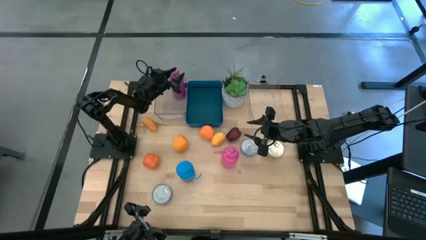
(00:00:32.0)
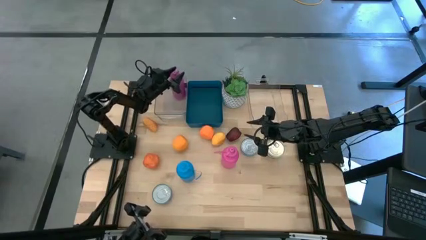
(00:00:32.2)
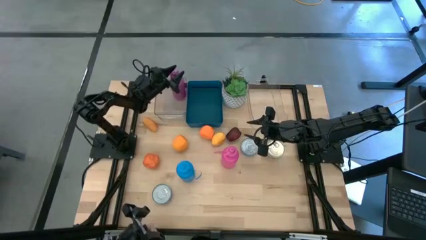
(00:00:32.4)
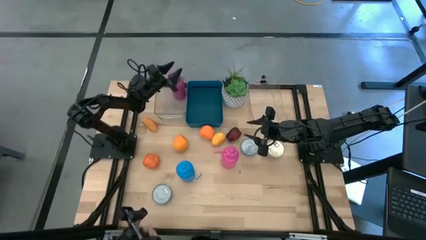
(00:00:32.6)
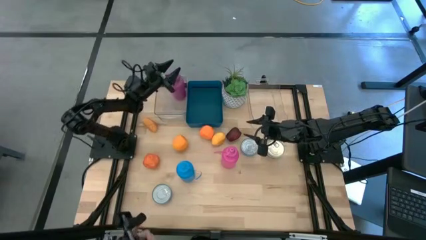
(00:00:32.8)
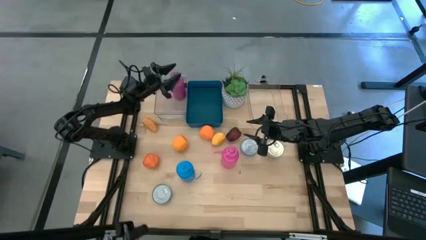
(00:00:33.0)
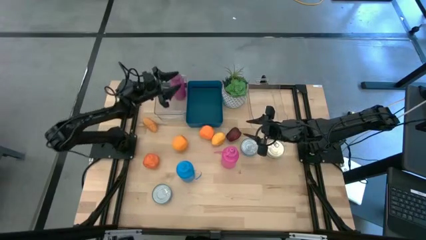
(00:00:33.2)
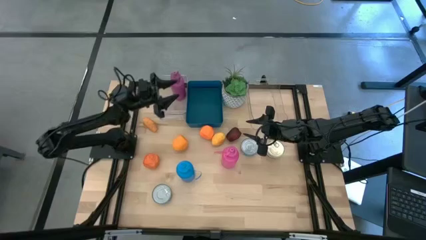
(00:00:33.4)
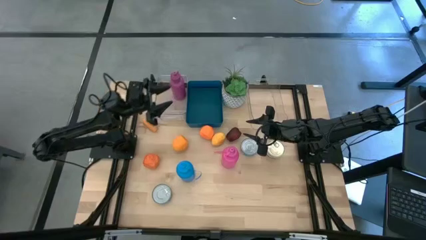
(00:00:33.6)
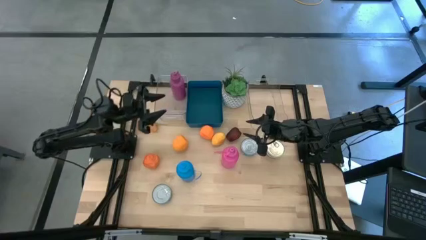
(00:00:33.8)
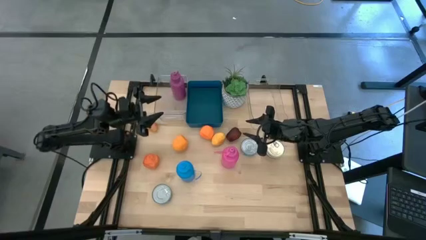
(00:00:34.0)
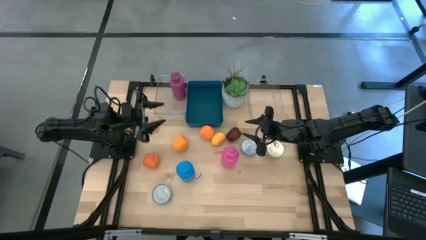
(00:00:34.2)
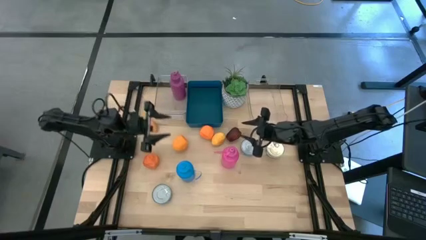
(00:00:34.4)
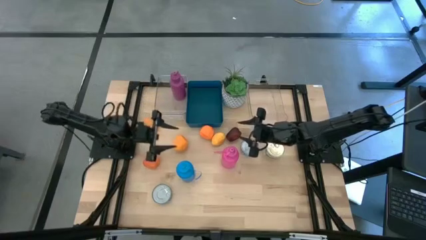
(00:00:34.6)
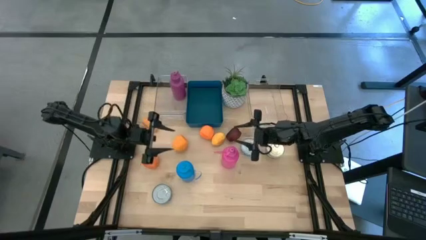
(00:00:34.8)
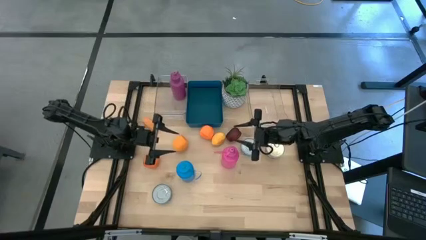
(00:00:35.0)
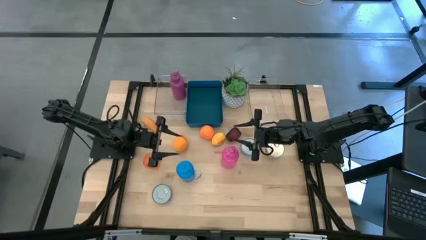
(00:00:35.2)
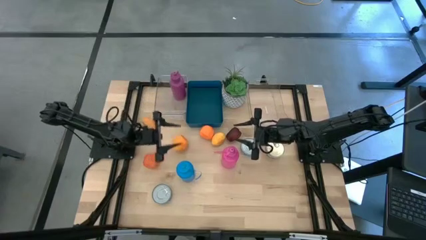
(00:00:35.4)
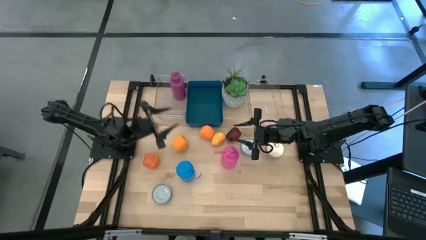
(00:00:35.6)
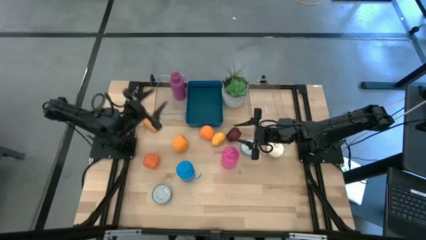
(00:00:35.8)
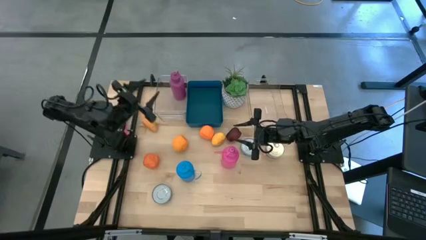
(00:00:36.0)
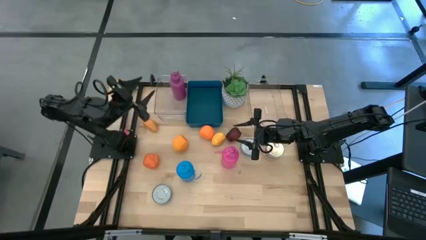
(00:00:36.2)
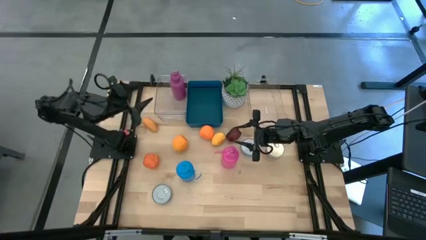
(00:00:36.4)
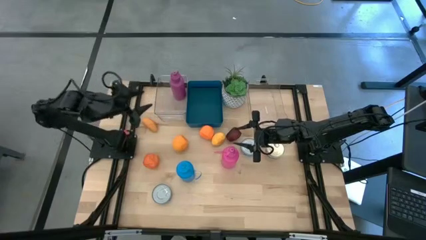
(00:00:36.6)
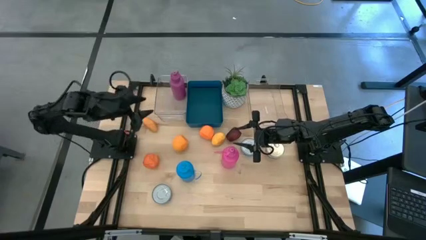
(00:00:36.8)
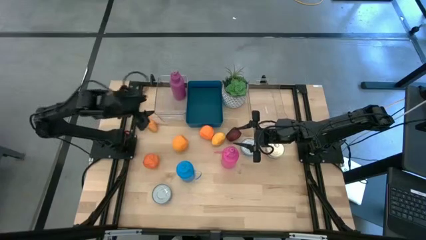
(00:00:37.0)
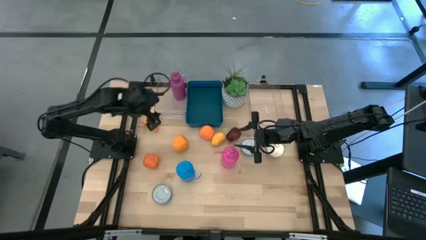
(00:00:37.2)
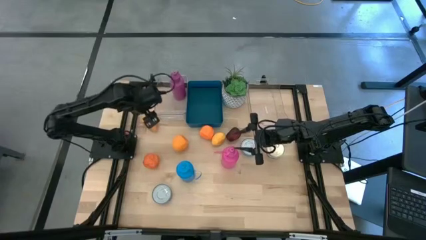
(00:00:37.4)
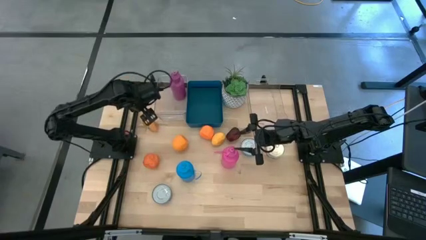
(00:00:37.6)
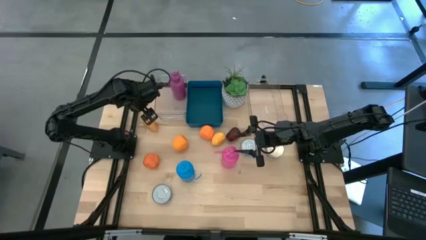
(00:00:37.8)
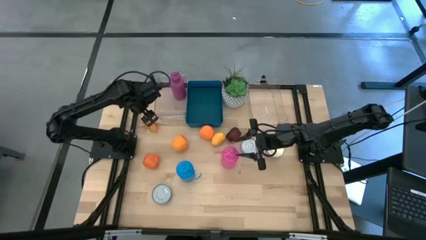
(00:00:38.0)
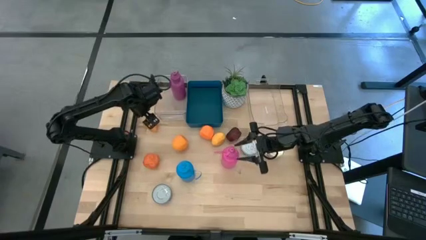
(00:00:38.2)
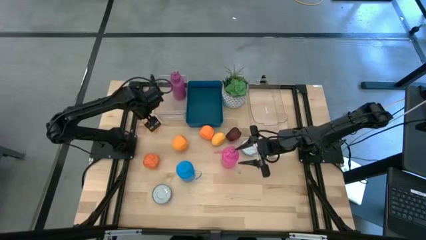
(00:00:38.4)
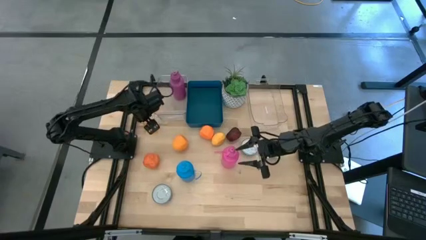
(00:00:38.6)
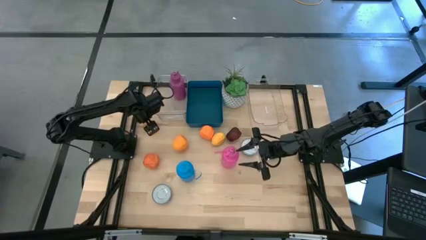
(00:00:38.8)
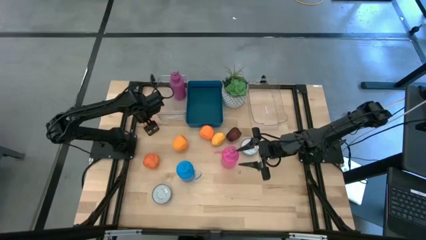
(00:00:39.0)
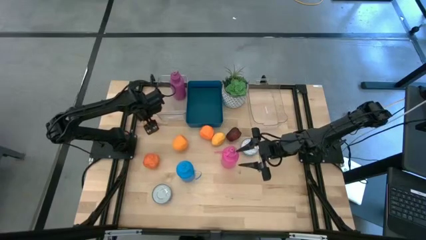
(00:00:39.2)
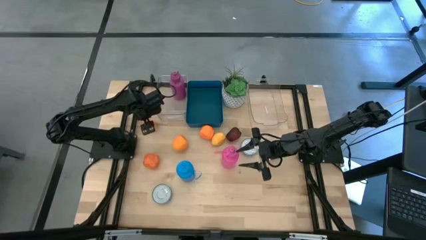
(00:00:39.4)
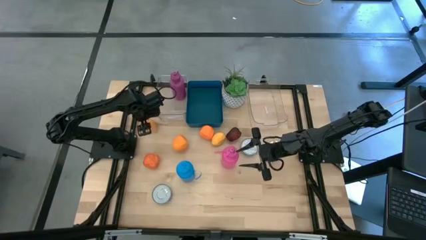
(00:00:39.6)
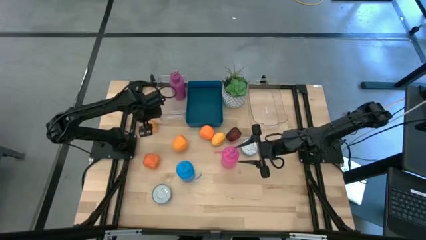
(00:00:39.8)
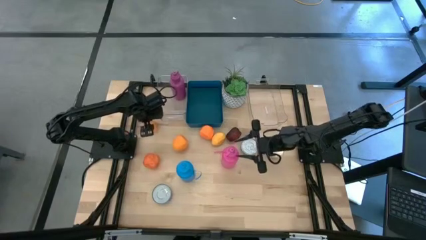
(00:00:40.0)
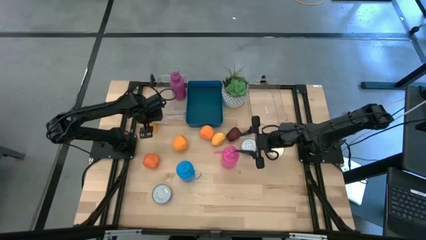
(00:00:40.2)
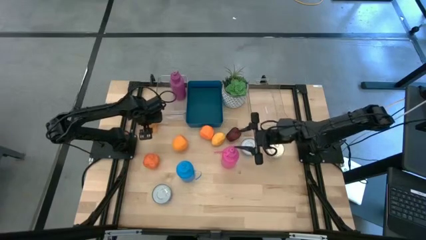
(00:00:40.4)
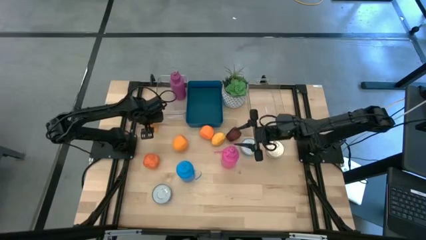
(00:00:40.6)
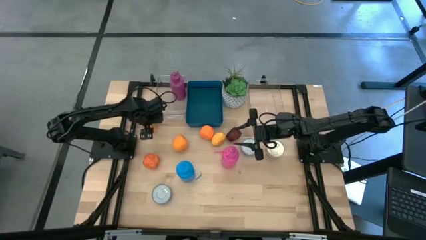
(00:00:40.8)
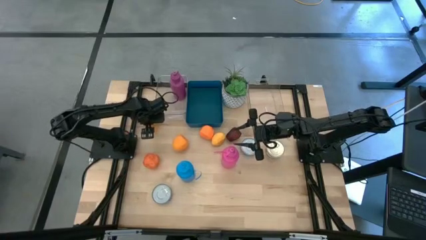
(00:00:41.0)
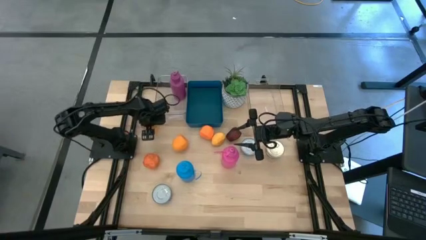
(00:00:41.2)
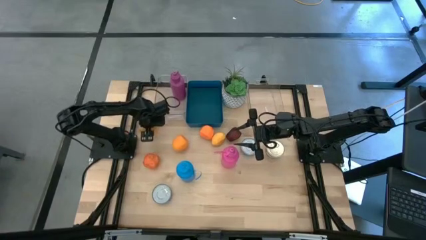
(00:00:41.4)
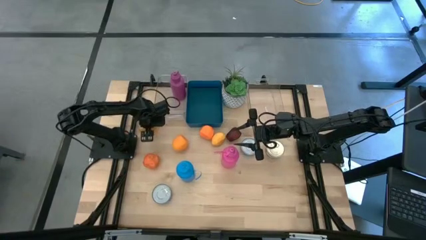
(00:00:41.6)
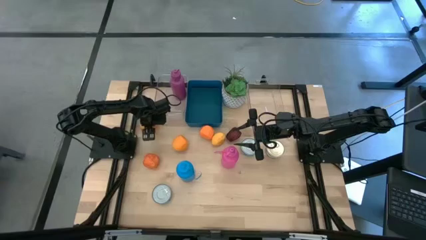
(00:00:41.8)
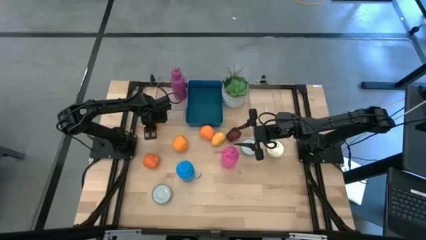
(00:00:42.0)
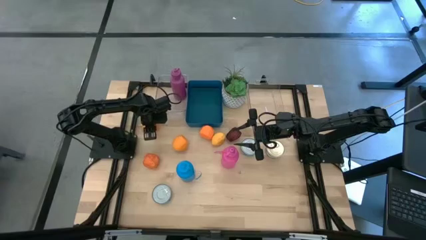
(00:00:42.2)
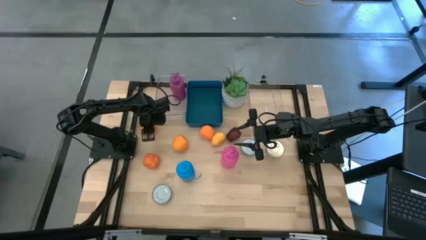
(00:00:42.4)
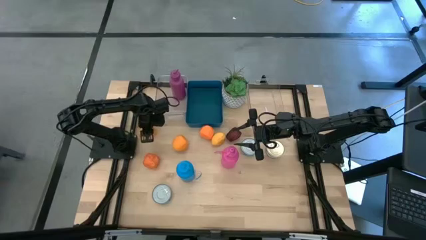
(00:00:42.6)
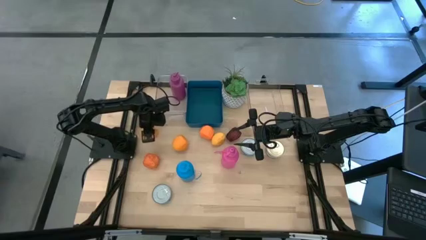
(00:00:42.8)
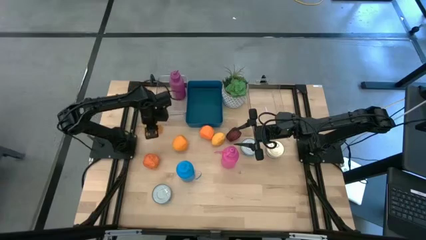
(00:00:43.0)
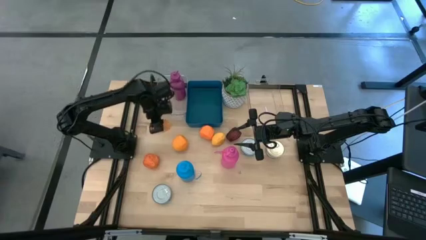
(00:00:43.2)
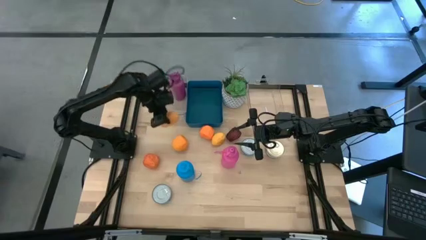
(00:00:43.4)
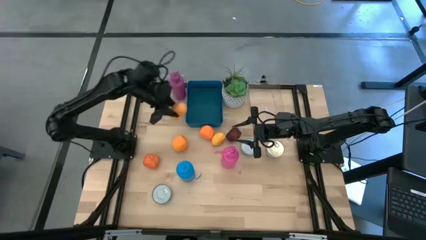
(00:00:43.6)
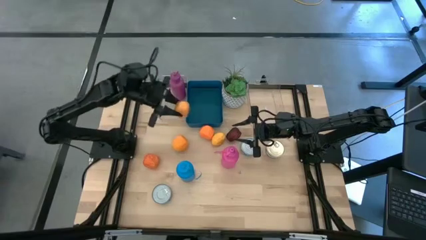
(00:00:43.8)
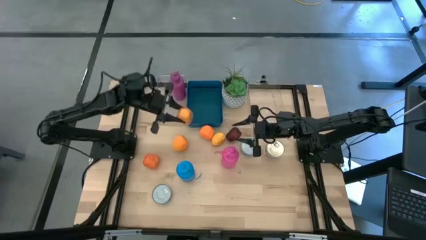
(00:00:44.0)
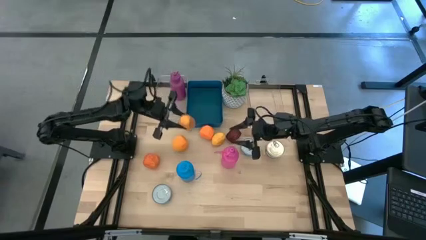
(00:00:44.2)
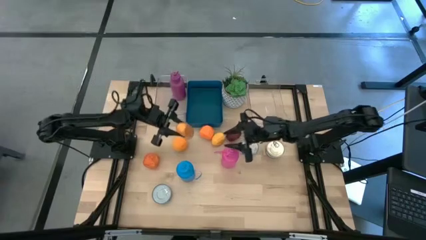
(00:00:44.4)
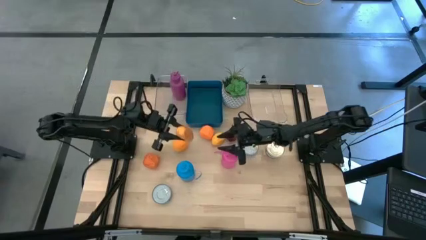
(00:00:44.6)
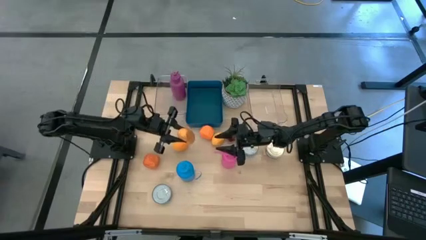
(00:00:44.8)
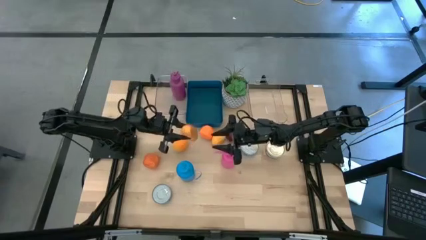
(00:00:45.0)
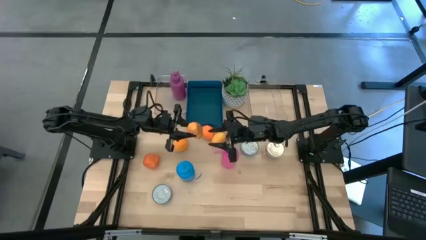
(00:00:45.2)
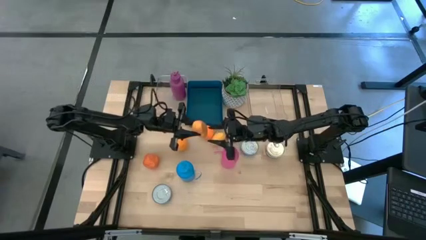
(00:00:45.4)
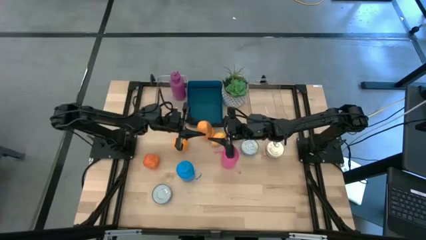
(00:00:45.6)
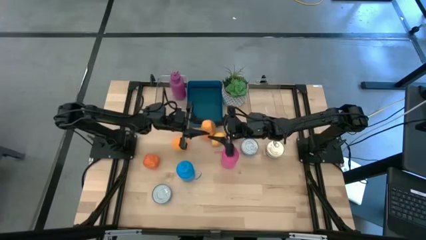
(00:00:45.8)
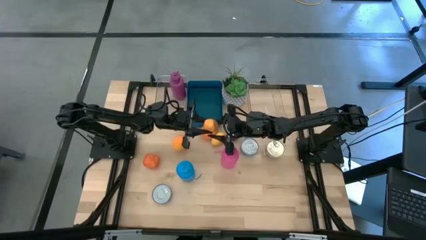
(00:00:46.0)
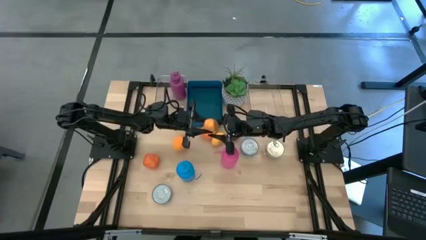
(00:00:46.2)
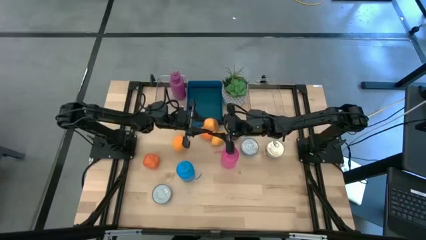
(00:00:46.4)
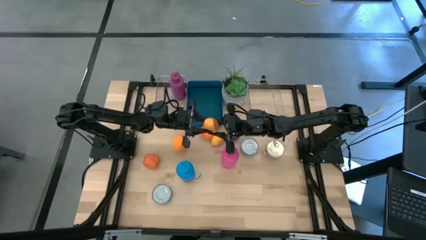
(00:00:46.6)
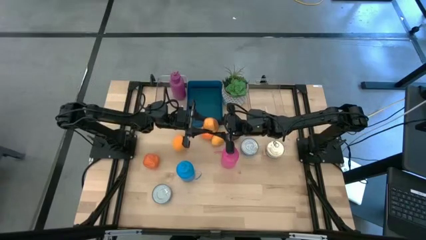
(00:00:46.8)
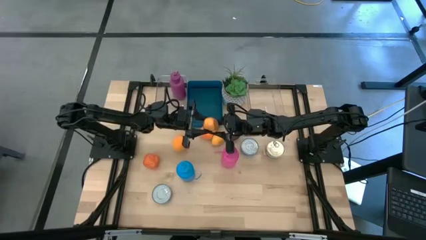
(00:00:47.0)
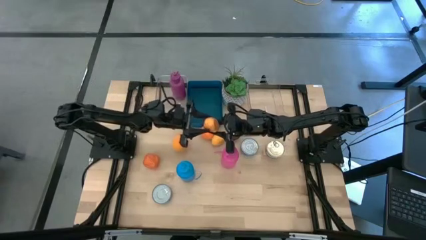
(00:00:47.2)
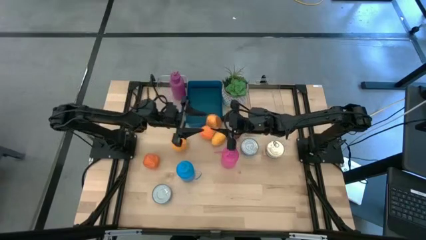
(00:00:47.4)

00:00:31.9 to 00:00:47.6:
Task: Pick & Place Food Item
Put the left mango into the right transparent bin

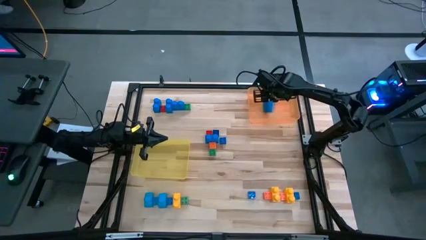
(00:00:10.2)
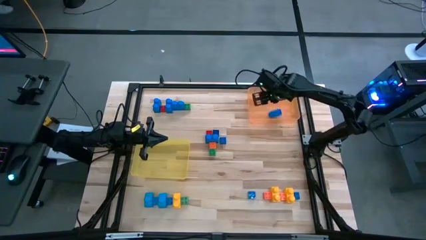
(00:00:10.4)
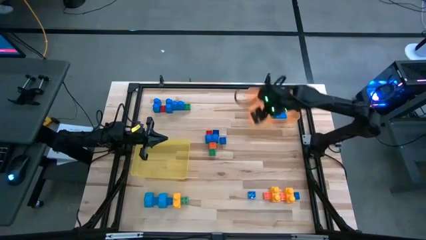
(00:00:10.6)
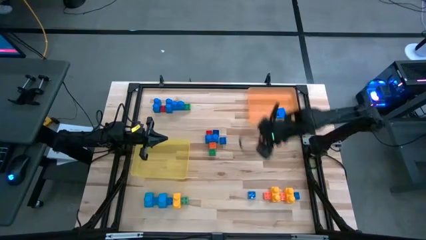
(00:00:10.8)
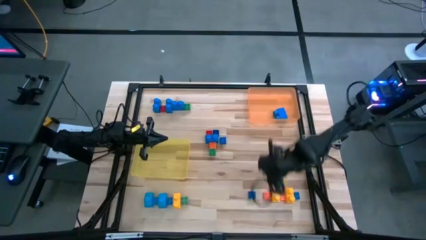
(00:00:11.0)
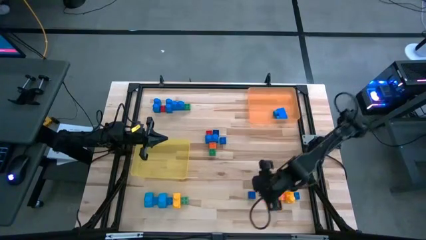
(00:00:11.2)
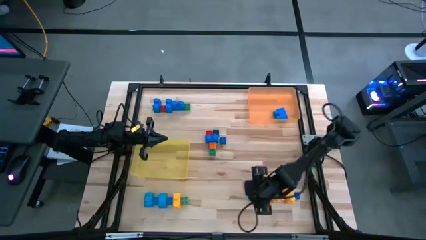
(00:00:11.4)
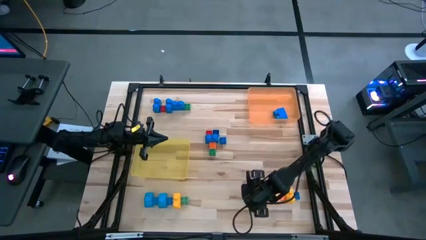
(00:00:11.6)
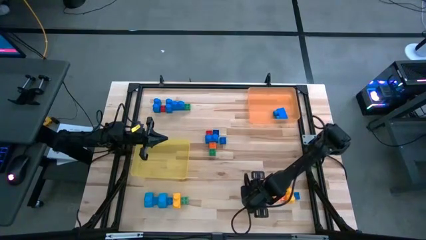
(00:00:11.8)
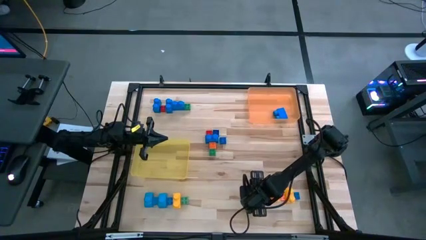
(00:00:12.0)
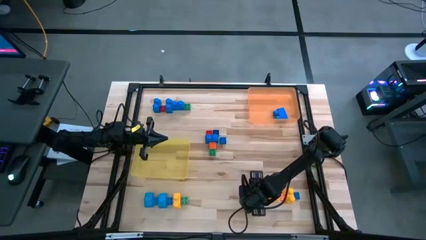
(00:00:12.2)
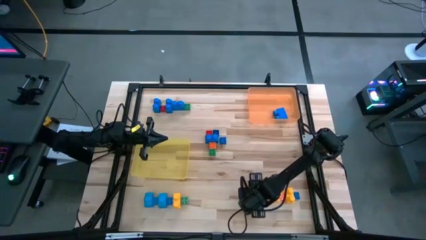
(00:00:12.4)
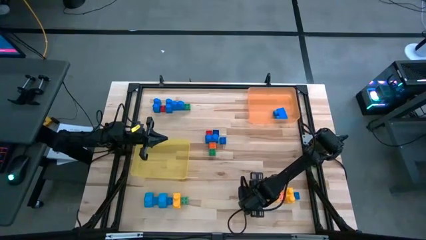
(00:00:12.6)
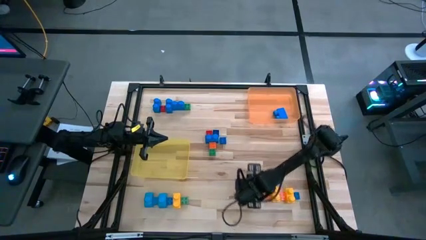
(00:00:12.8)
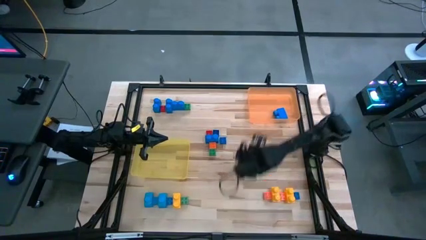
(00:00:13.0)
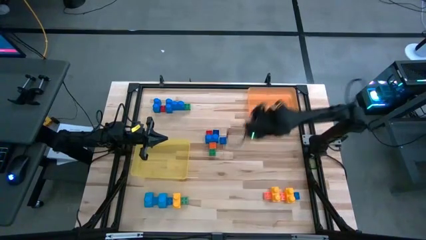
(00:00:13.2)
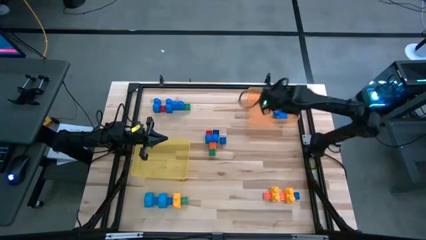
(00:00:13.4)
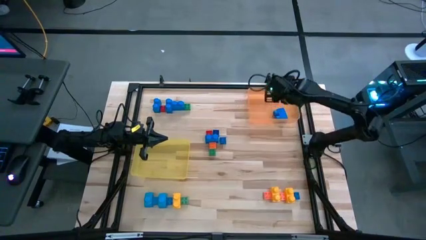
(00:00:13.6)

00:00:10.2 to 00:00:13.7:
Task: Sort blocks by size
Put the small blue 4 stud game piece into the yellow bin
